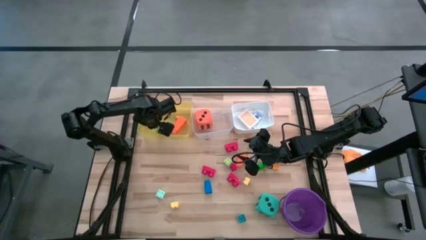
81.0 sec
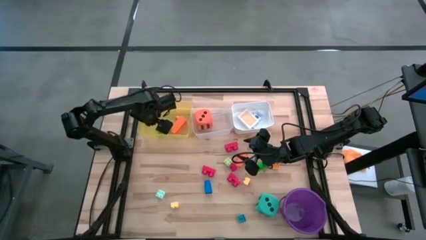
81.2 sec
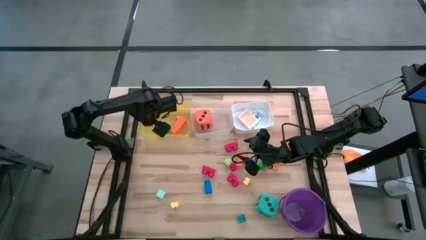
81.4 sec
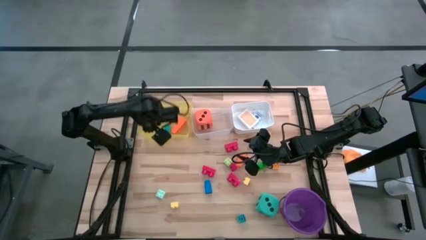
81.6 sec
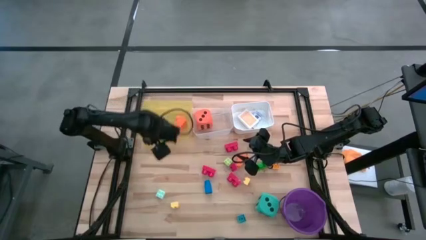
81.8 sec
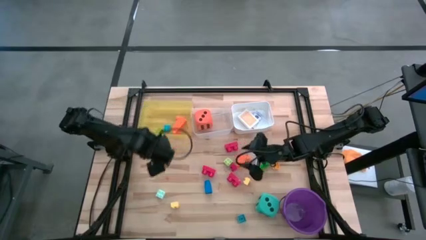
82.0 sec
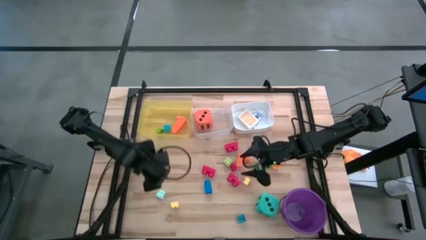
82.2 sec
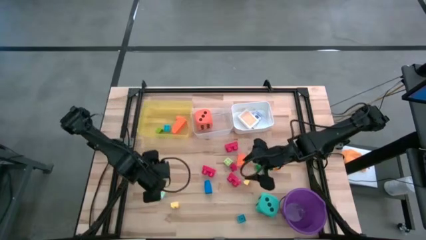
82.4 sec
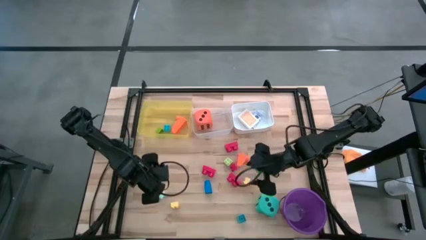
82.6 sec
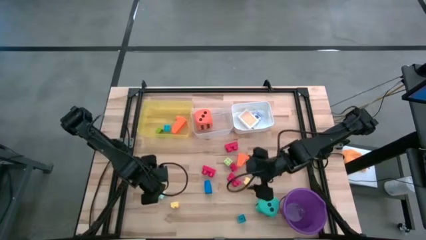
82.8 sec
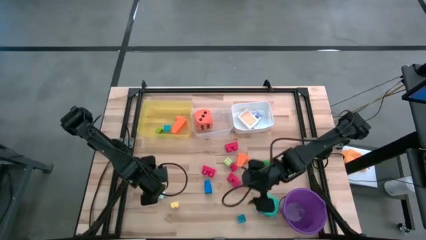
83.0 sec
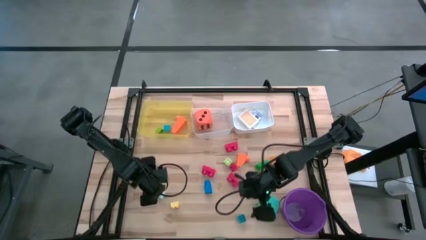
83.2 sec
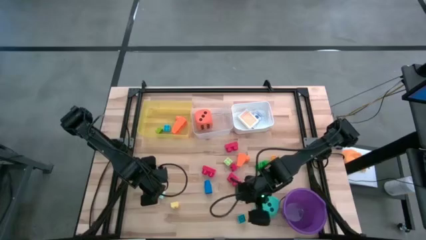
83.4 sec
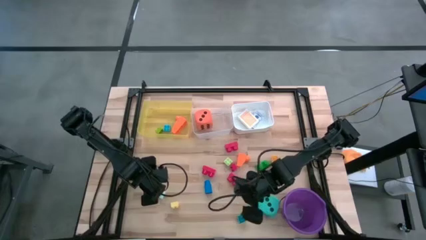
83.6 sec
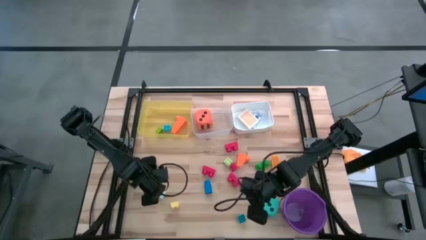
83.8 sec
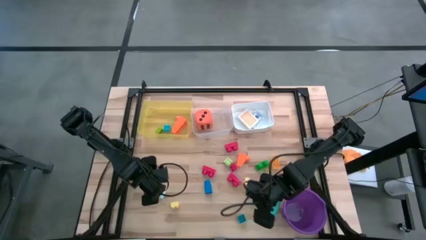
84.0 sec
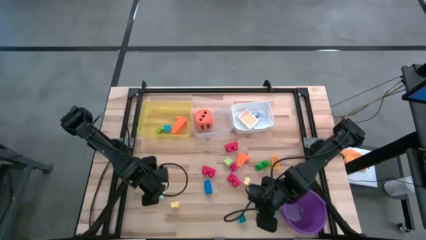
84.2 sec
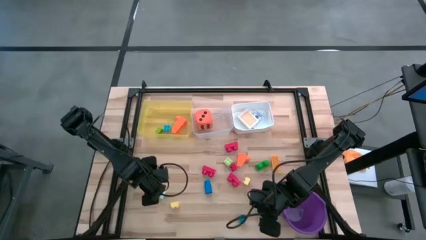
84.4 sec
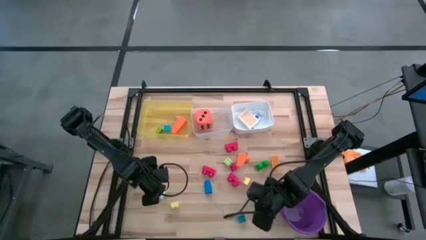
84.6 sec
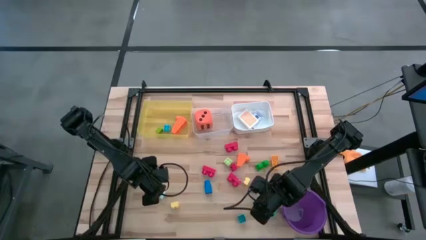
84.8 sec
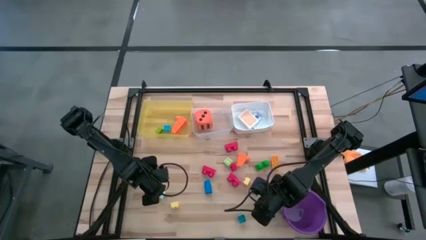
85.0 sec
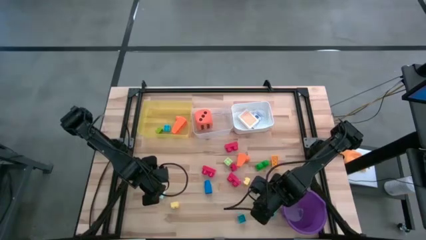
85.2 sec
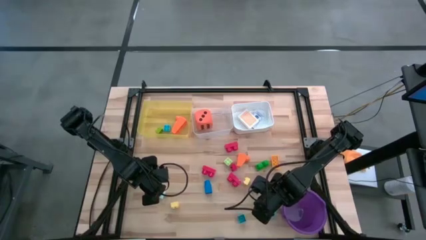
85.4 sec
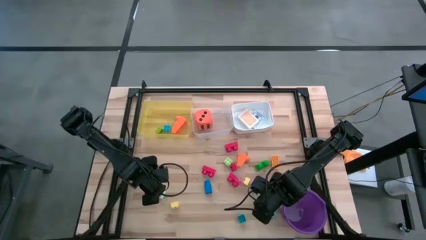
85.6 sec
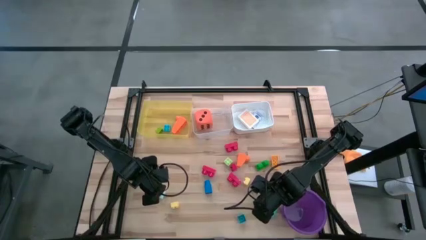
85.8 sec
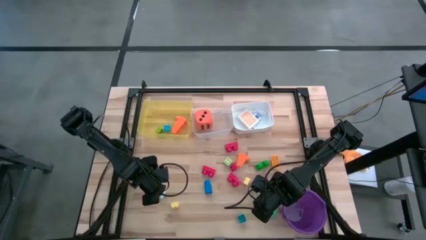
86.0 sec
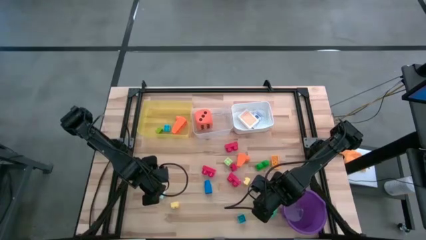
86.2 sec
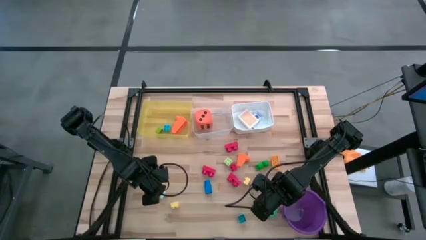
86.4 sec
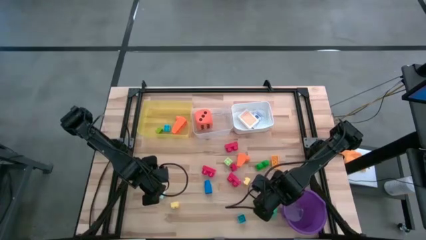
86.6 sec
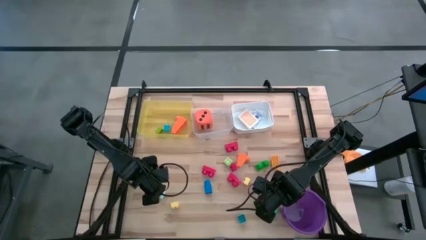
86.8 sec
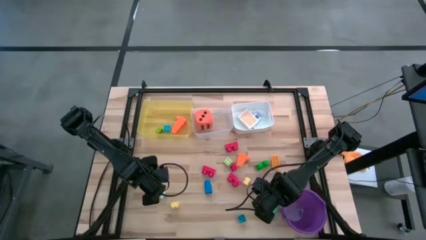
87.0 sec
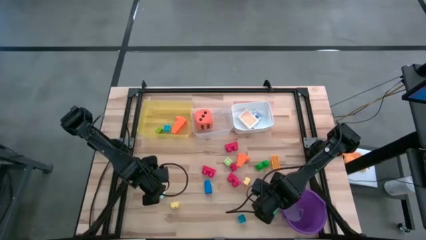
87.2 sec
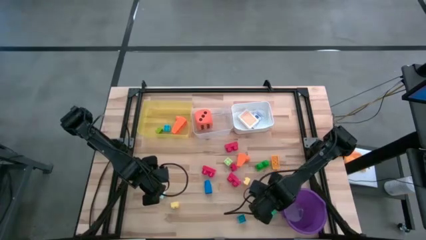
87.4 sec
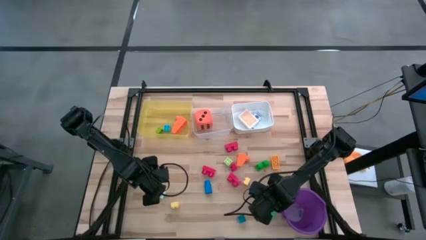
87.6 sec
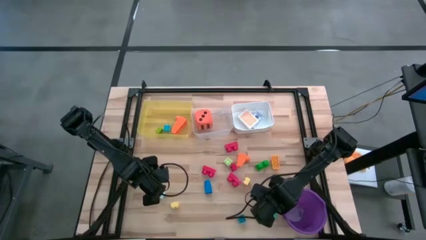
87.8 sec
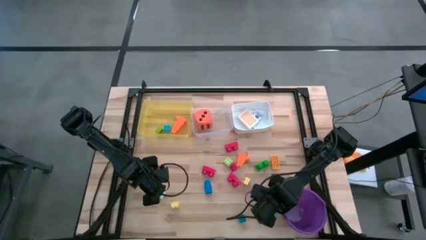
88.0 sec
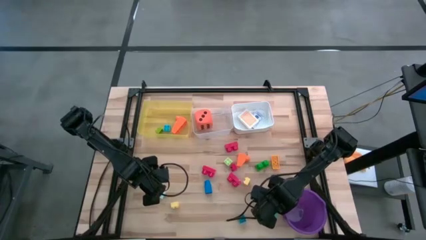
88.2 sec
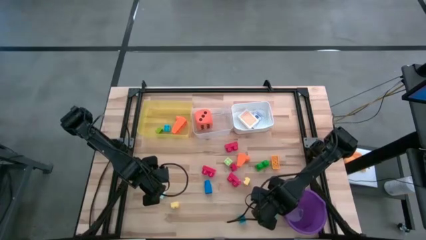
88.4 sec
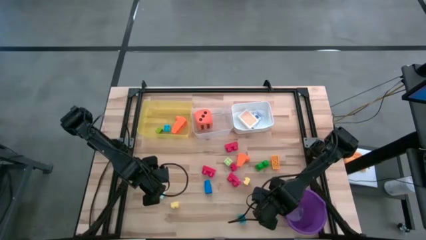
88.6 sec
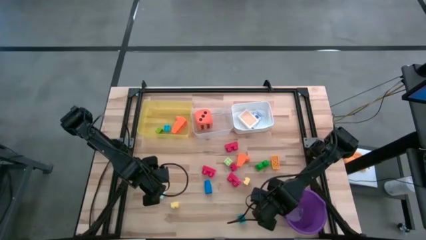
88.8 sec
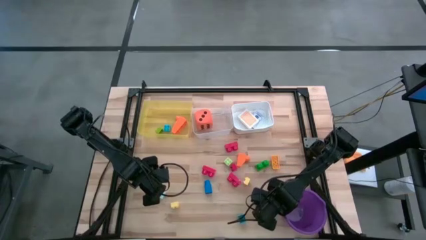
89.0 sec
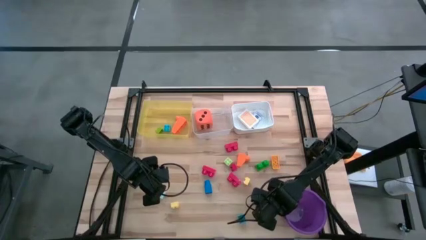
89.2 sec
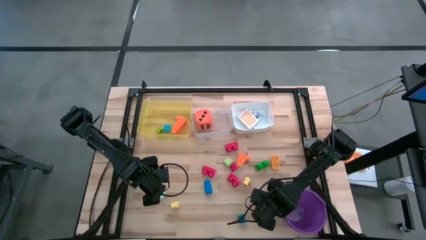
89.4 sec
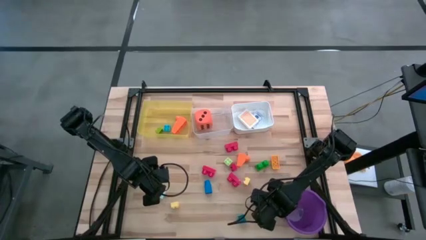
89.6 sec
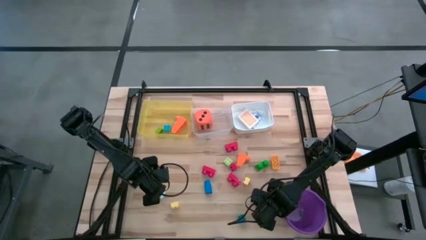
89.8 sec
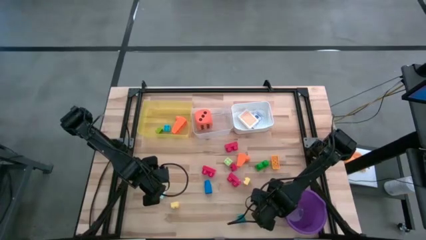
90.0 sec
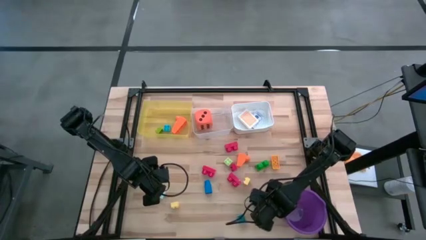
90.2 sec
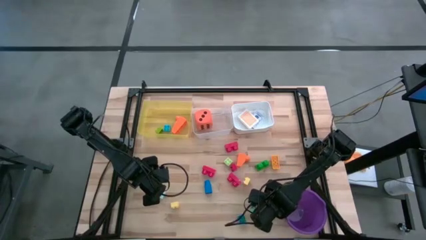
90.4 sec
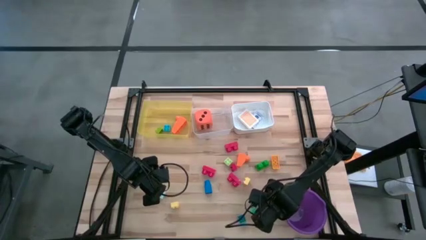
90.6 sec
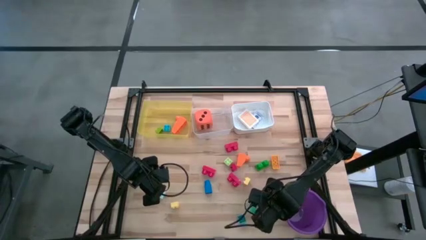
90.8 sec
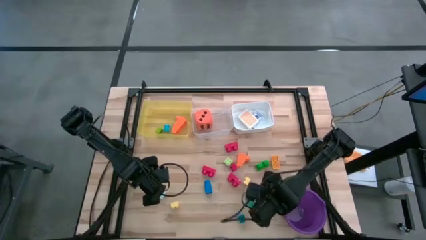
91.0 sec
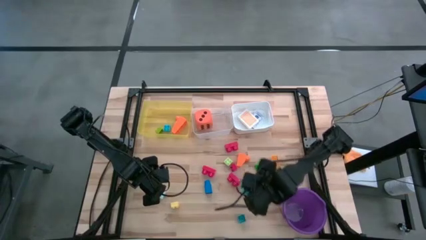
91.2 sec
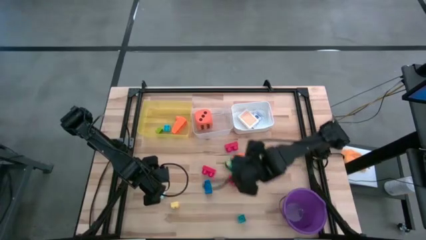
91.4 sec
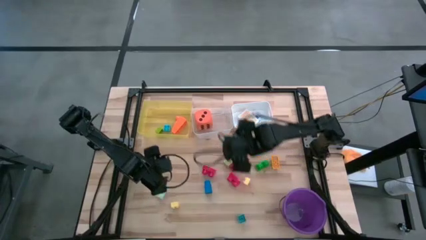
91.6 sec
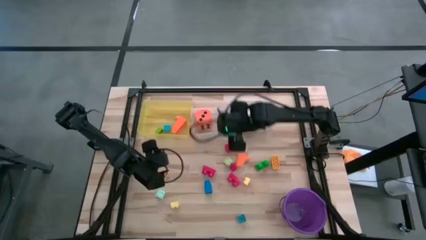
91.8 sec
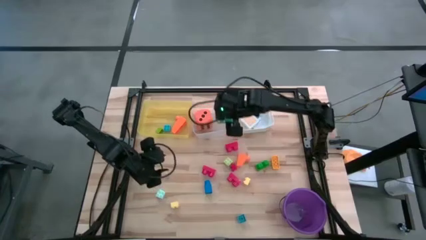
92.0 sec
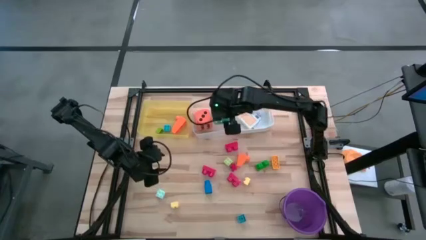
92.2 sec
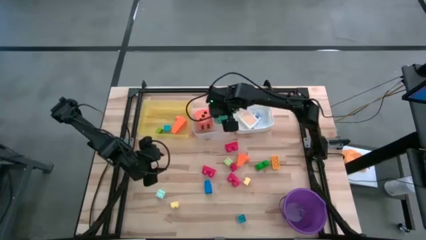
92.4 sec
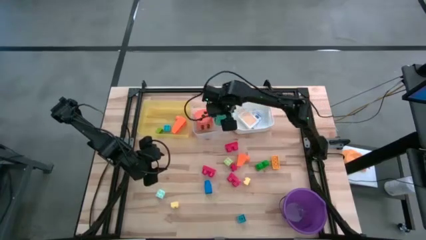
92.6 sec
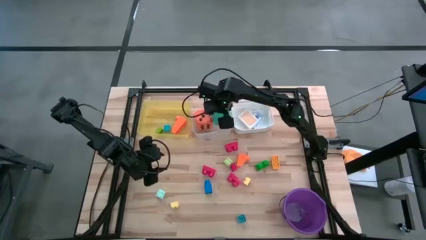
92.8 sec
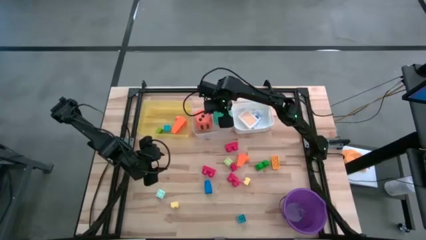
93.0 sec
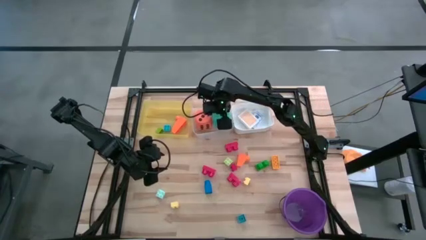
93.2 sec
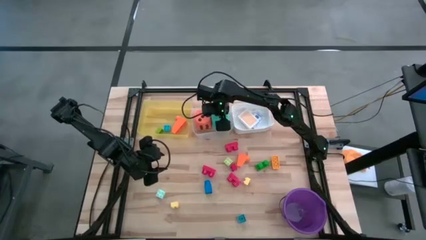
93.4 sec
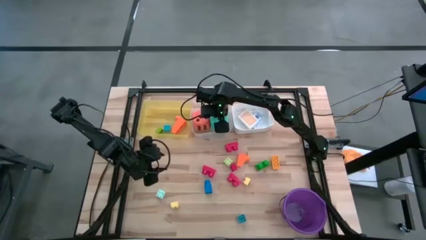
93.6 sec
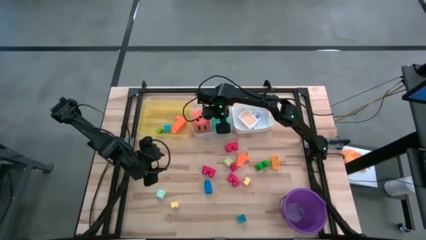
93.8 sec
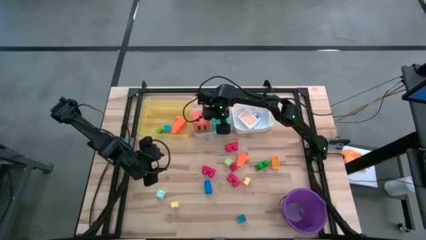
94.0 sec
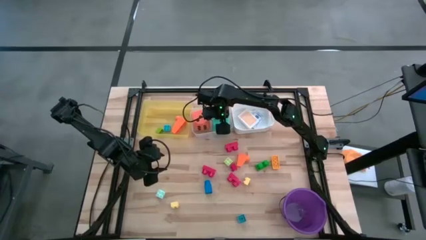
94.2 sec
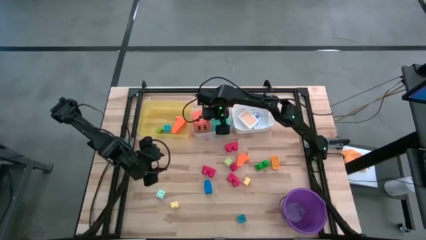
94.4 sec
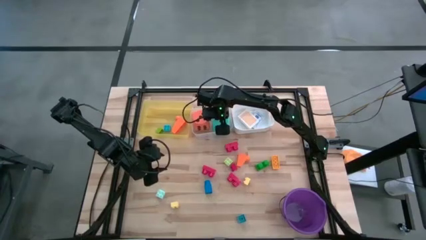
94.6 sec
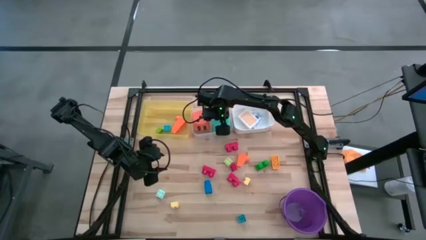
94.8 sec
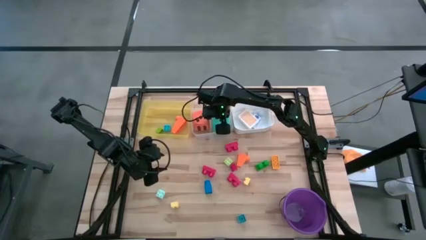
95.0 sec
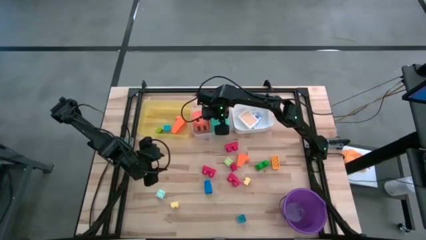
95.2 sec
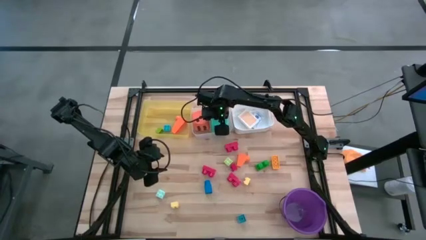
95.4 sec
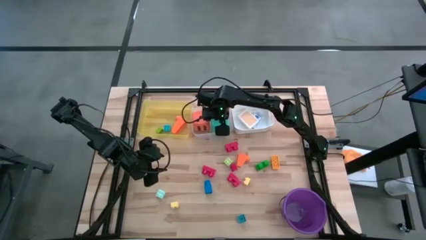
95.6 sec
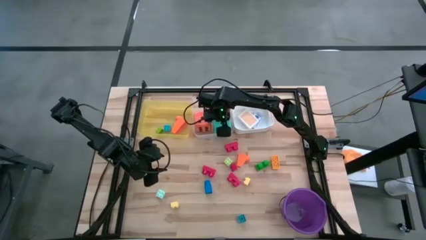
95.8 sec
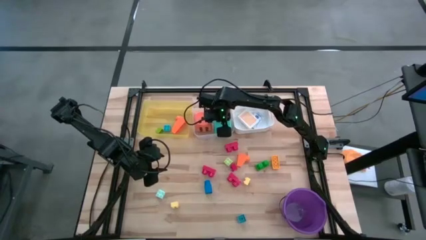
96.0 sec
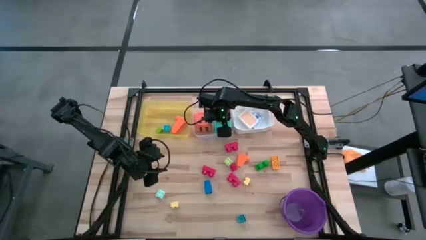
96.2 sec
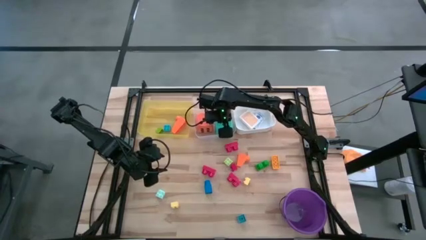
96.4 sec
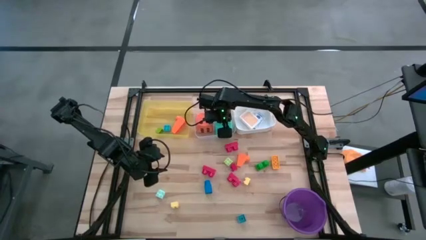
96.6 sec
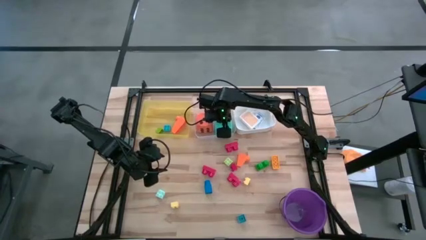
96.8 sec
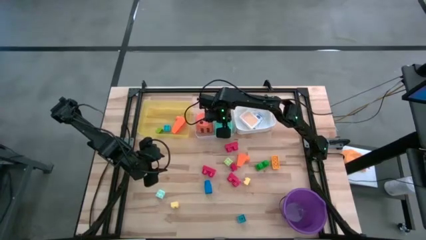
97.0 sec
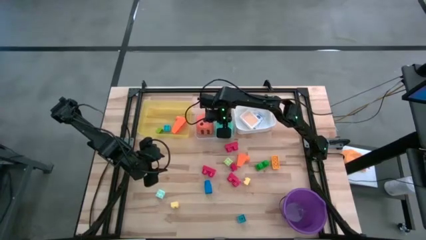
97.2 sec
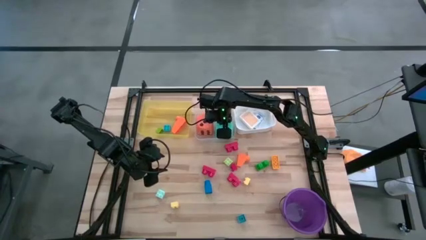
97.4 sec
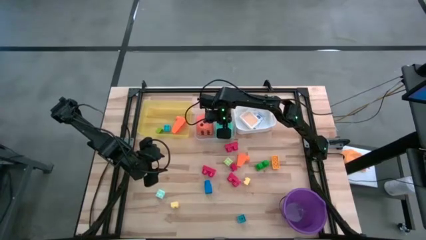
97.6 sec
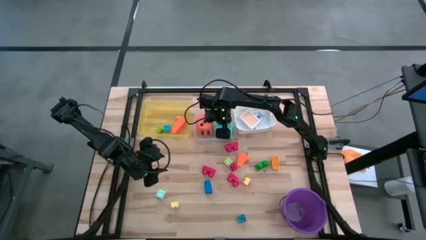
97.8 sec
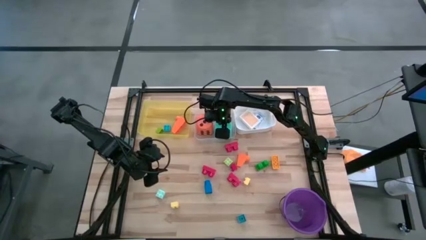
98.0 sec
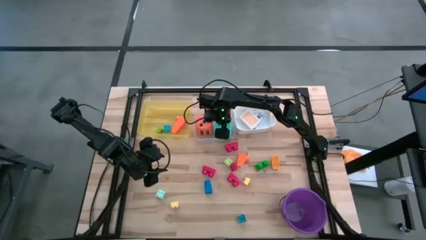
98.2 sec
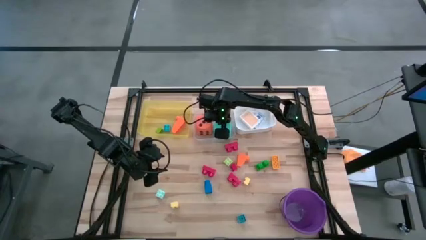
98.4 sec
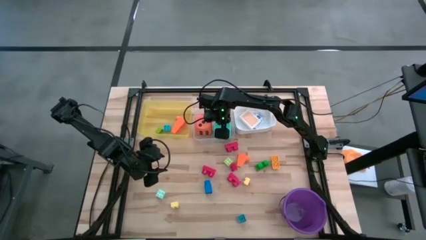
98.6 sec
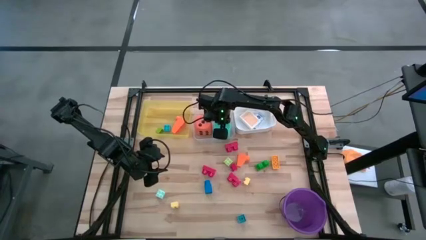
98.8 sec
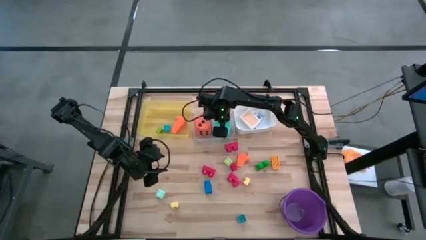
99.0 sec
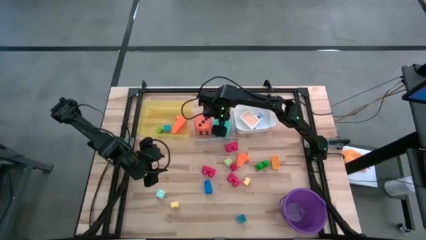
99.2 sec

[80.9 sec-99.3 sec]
Task: Pick & Place Toys
Put the blue dice into the transparent bin
